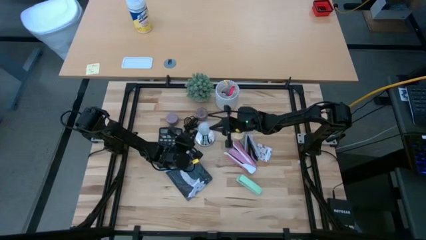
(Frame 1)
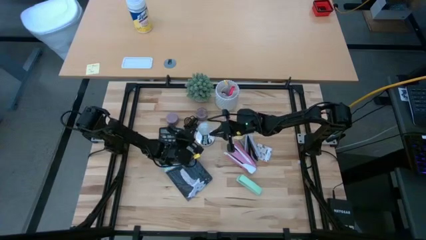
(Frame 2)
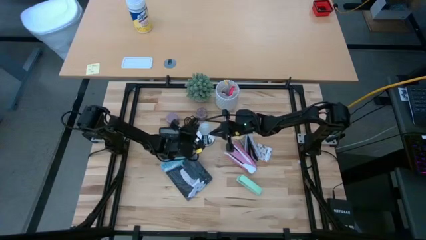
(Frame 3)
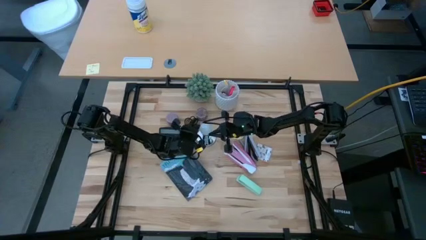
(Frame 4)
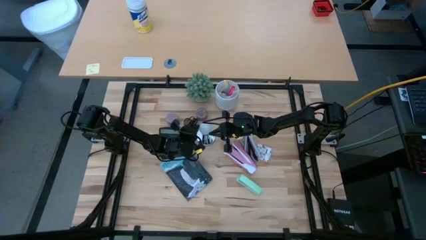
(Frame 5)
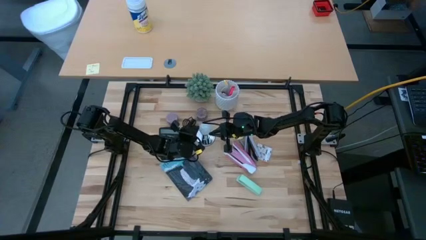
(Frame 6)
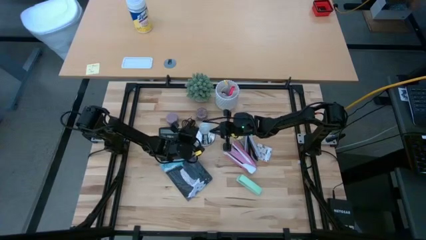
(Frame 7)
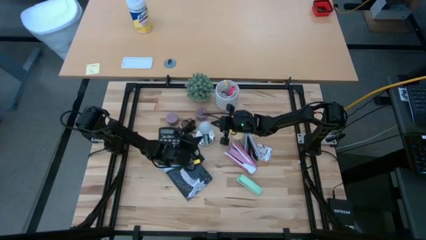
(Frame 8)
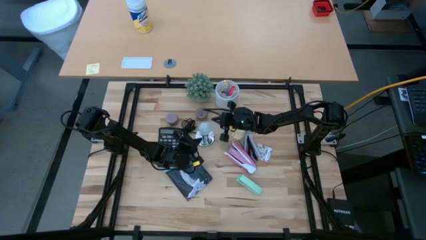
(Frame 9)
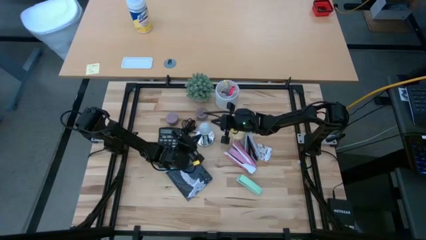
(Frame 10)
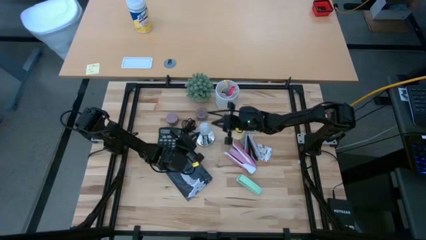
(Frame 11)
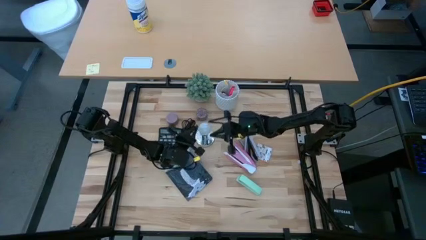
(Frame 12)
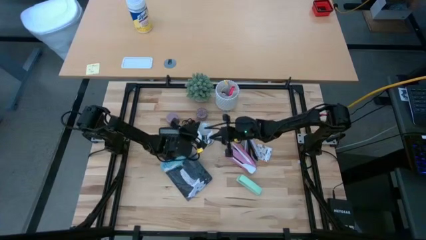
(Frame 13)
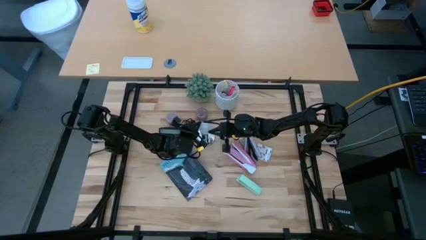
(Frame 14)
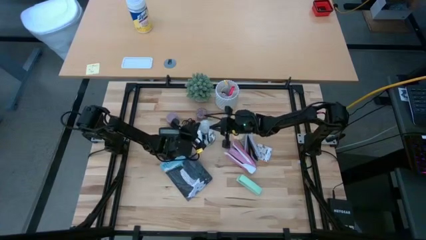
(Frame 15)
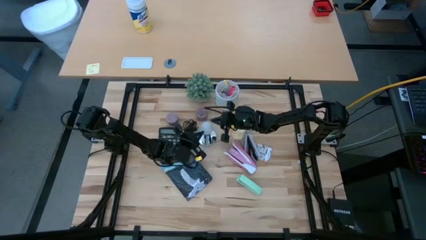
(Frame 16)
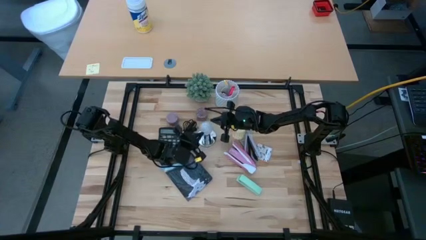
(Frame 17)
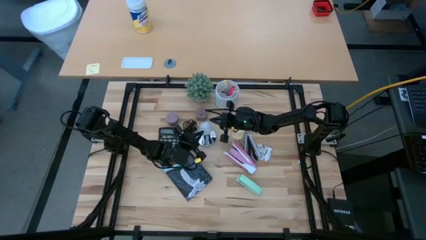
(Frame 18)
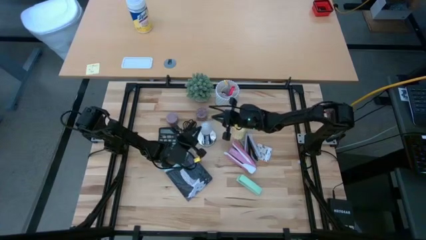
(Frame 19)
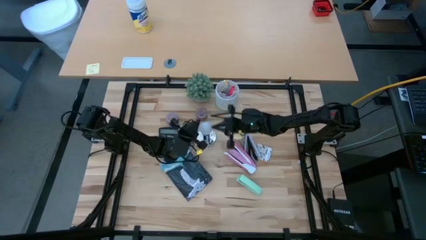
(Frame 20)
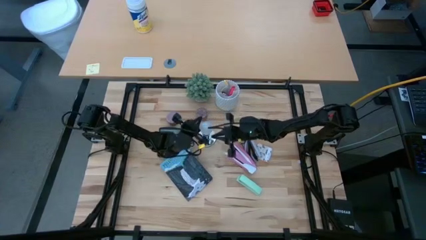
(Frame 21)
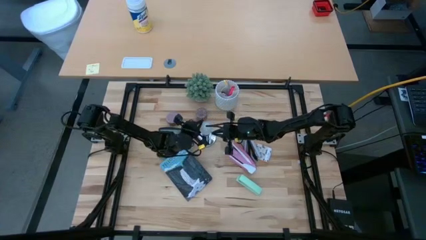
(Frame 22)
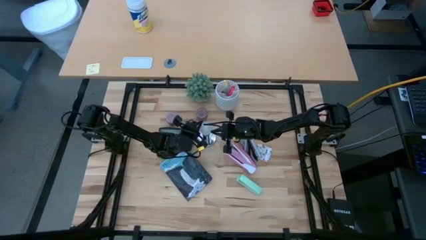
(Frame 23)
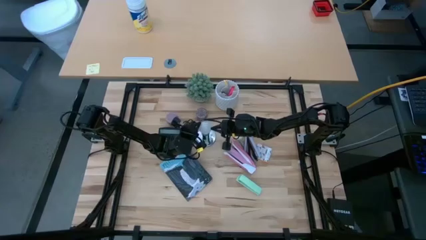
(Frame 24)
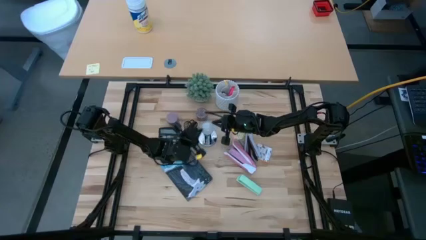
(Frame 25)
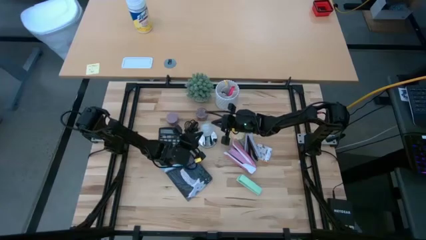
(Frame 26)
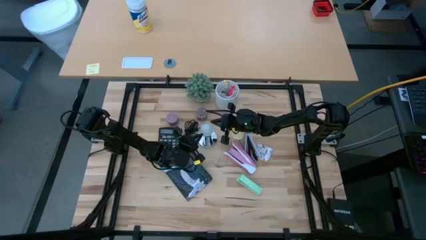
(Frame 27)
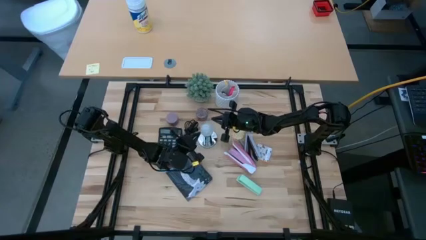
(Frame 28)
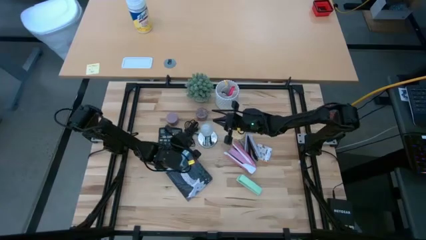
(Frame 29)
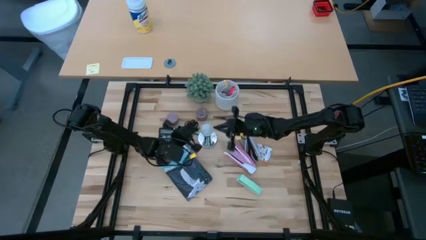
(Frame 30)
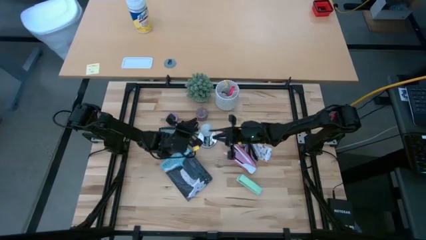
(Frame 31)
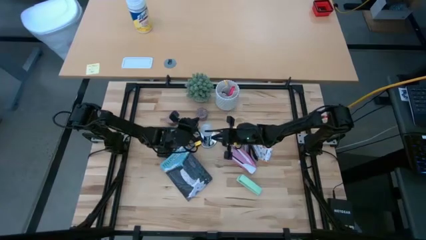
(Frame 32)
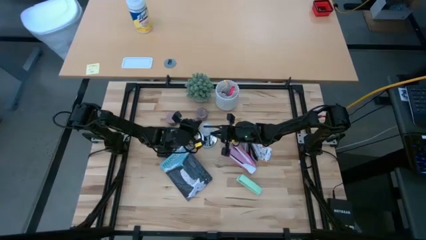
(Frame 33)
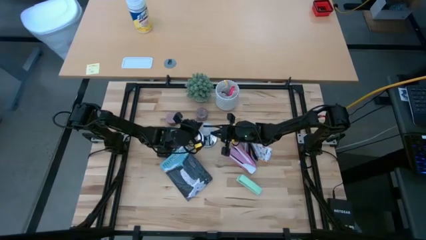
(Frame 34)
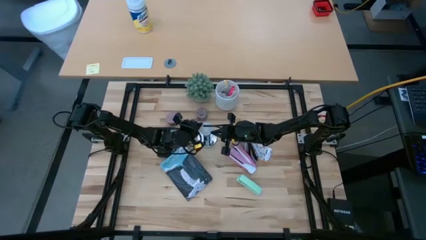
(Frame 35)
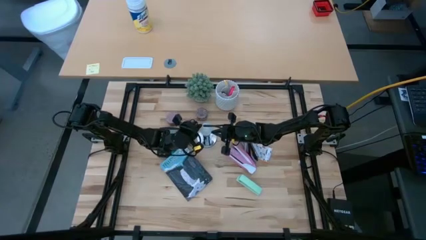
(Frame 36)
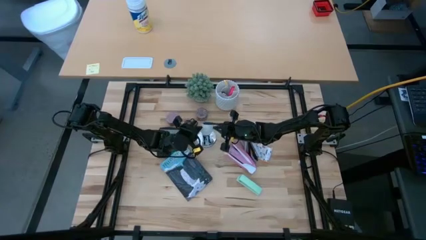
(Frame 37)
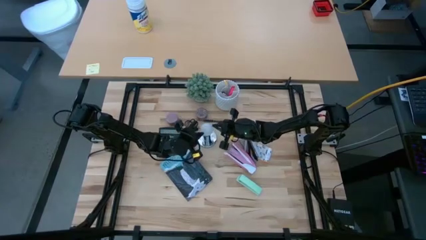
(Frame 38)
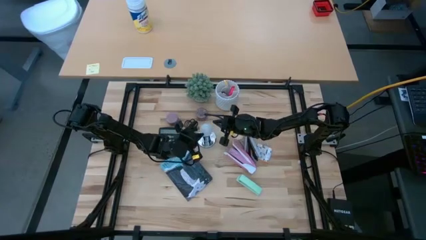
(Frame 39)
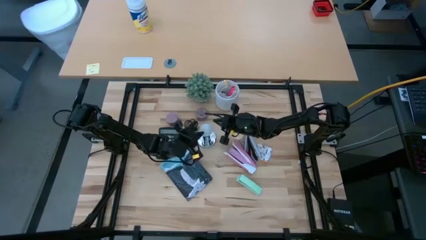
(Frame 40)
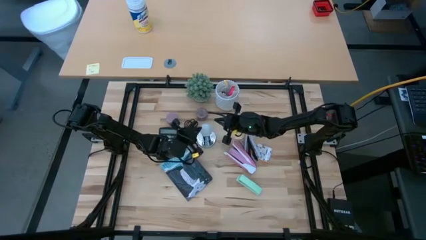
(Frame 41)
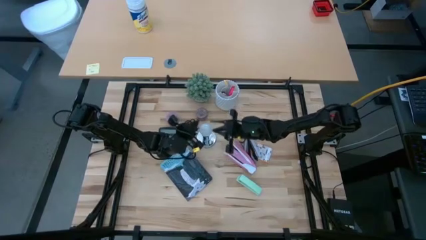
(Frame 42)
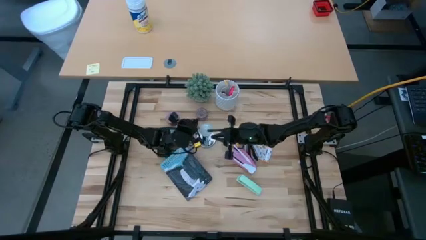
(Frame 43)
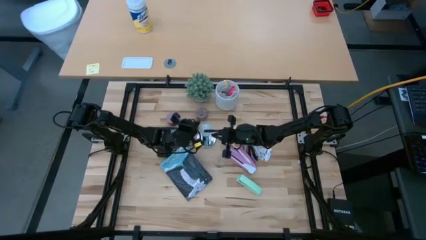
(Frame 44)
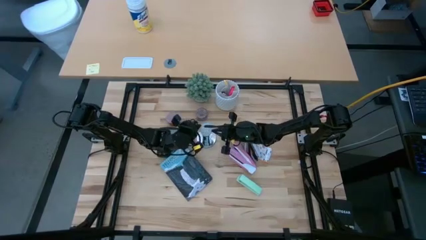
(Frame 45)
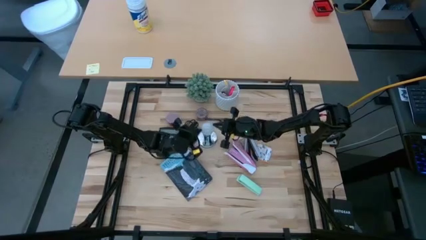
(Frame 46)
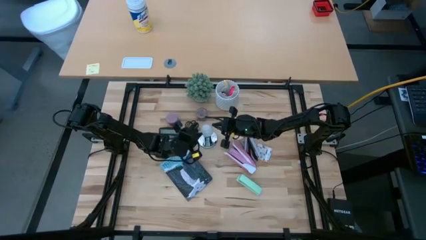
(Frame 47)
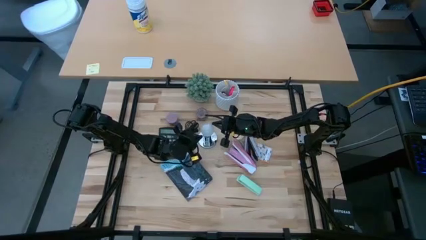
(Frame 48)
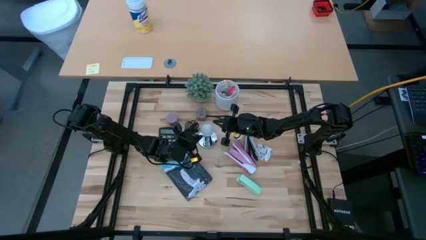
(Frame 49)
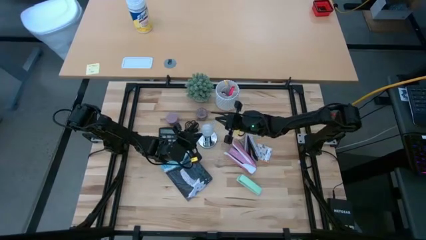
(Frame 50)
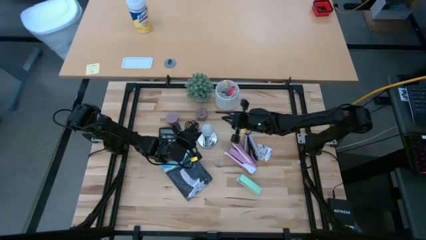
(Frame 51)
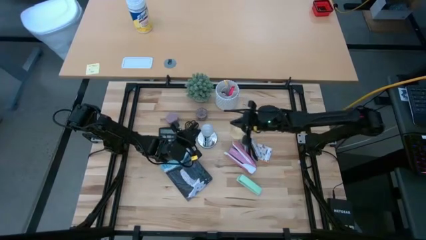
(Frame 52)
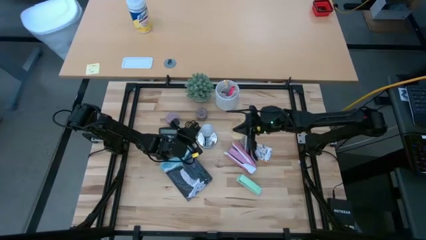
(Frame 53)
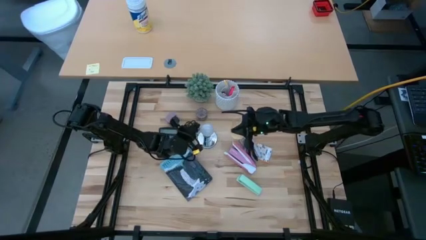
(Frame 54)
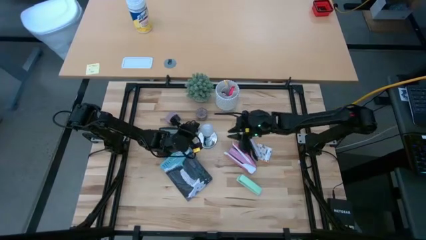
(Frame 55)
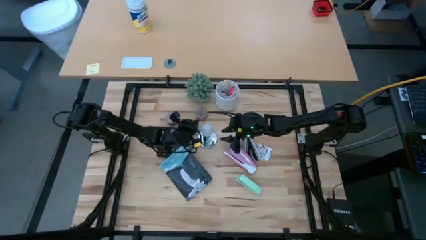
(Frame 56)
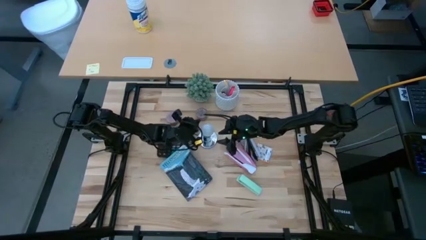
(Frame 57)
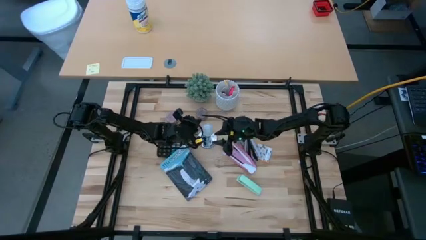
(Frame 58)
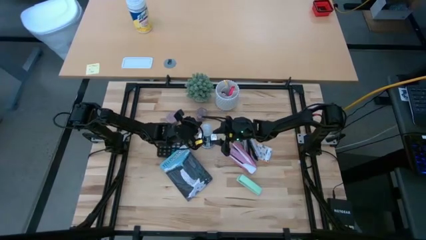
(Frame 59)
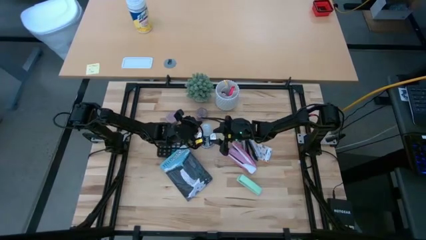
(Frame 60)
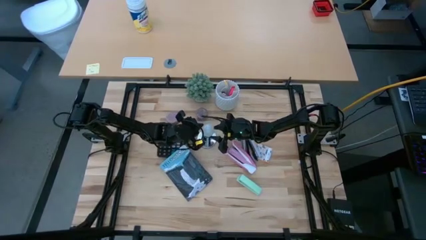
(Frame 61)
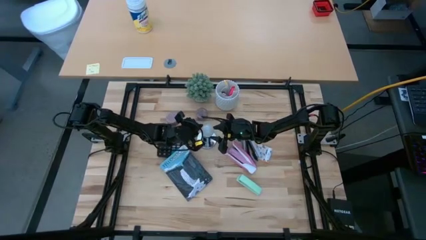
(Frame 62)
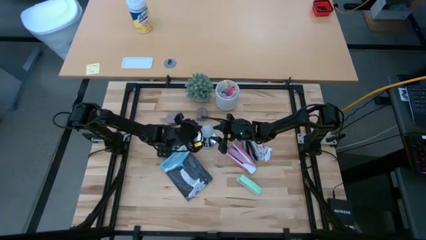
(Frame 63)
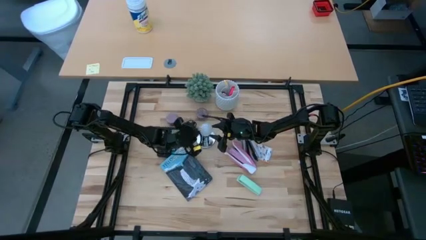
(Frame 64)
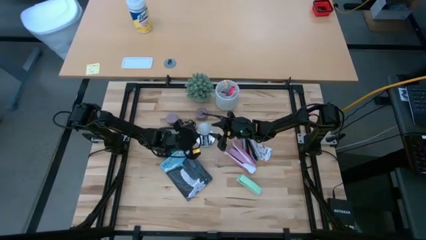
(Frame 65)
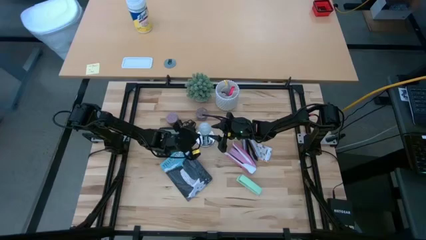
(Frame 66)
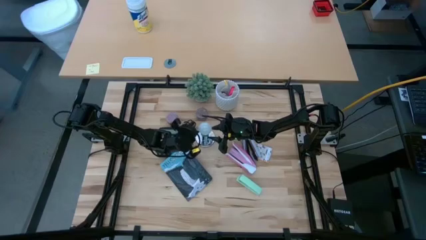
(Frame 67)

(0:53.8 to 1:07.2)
Task: Screw lightbulb
Remove the lightbulb from the lamp
